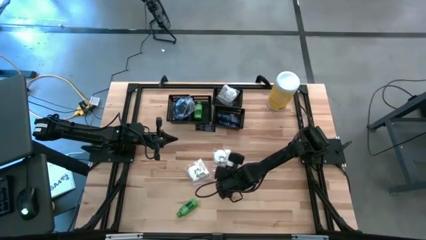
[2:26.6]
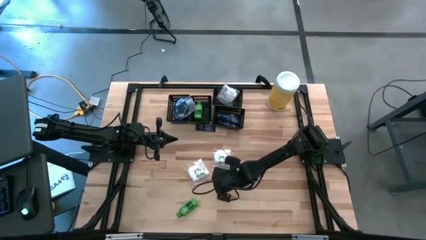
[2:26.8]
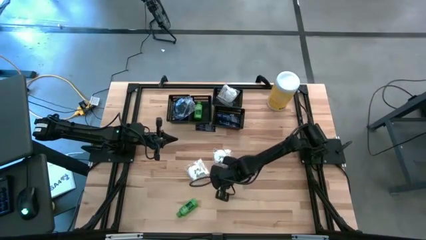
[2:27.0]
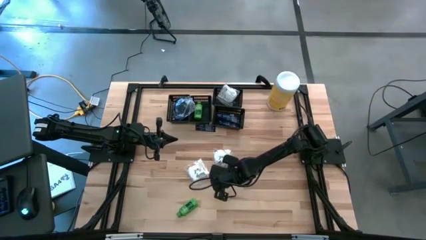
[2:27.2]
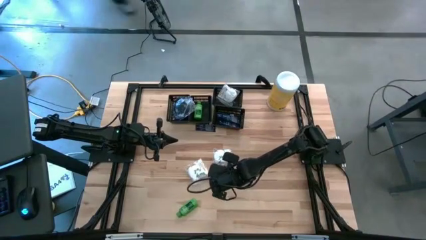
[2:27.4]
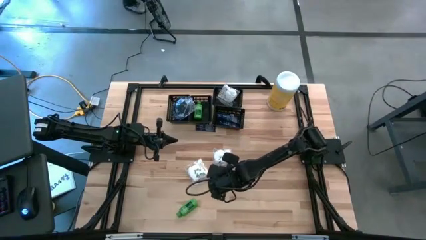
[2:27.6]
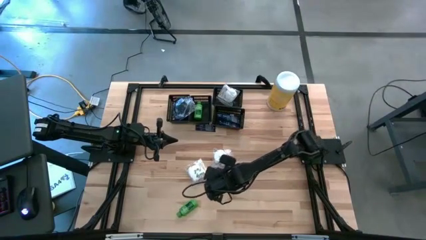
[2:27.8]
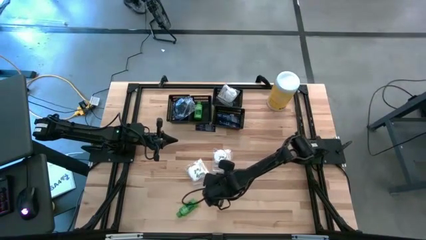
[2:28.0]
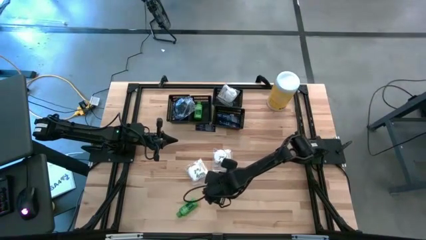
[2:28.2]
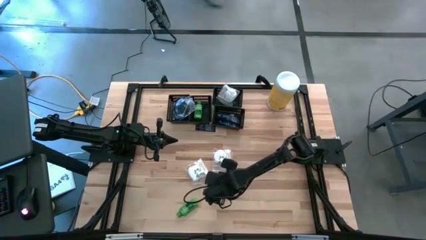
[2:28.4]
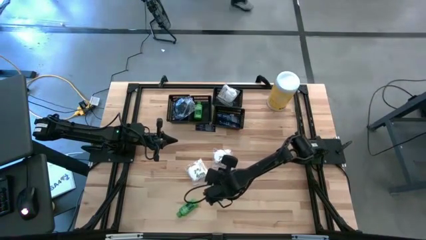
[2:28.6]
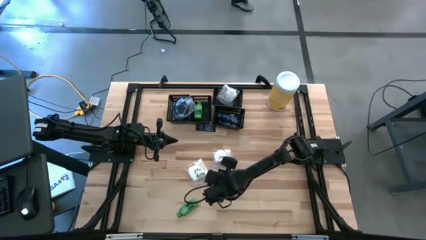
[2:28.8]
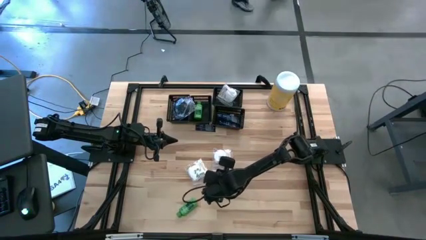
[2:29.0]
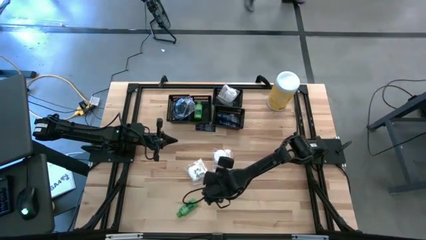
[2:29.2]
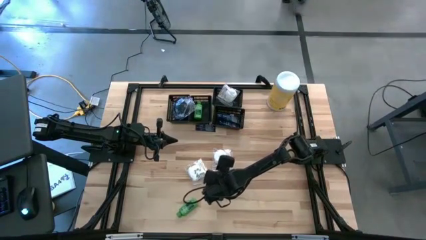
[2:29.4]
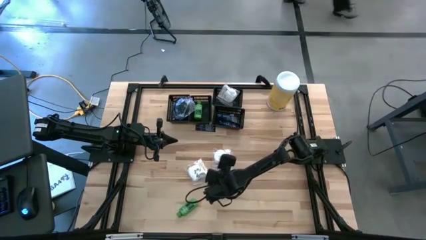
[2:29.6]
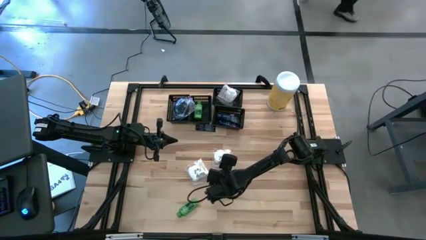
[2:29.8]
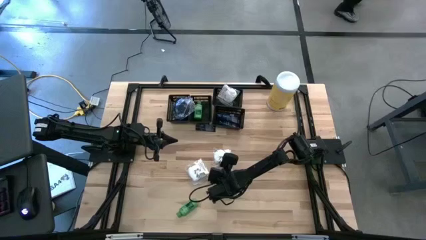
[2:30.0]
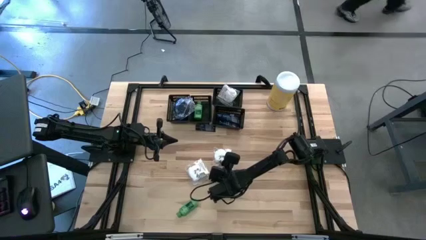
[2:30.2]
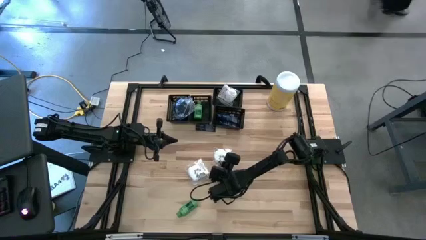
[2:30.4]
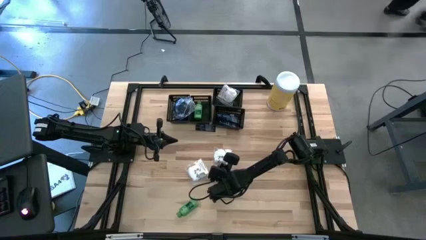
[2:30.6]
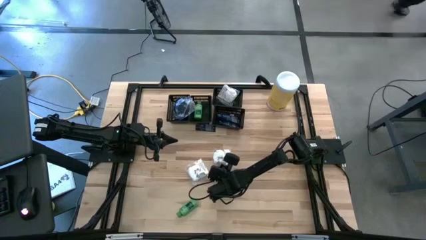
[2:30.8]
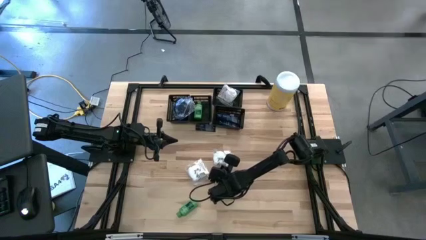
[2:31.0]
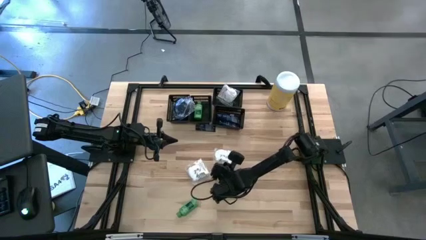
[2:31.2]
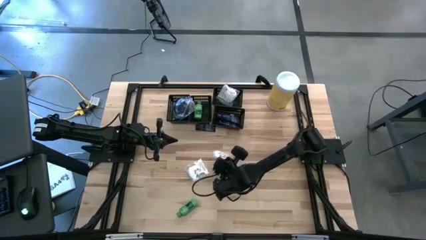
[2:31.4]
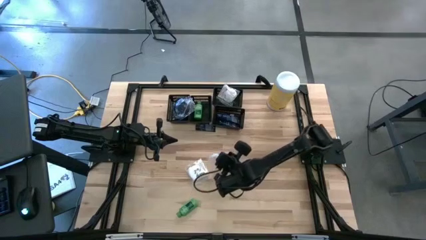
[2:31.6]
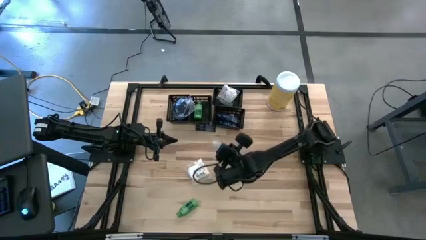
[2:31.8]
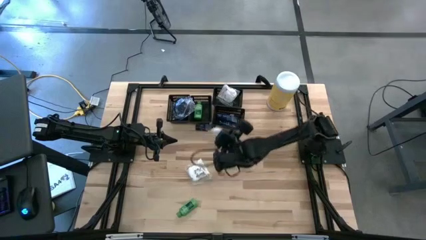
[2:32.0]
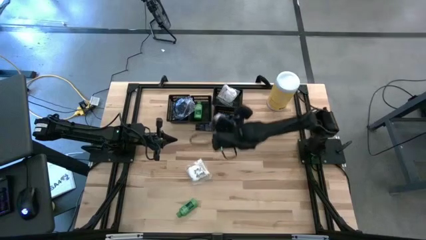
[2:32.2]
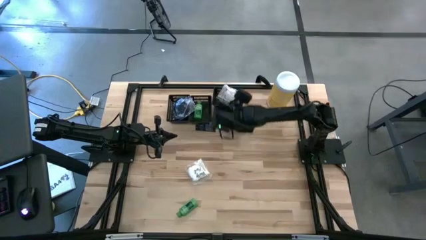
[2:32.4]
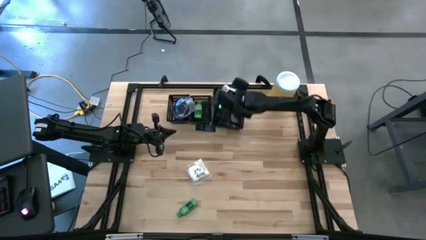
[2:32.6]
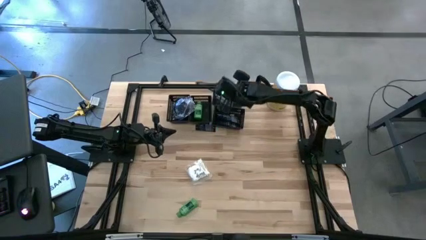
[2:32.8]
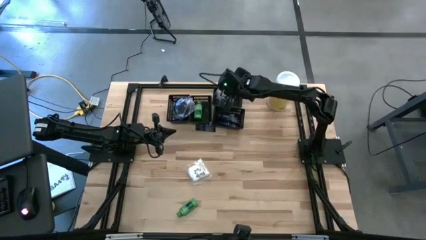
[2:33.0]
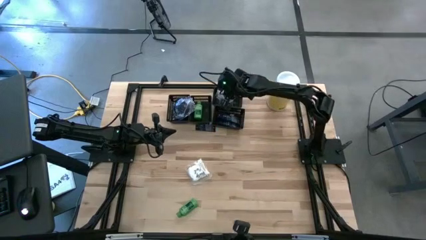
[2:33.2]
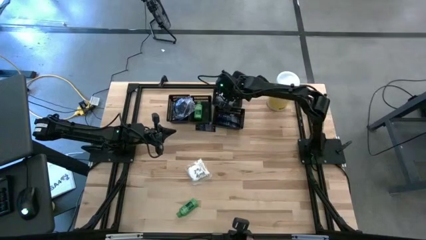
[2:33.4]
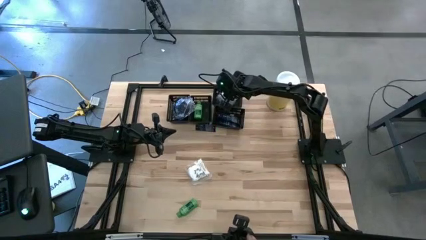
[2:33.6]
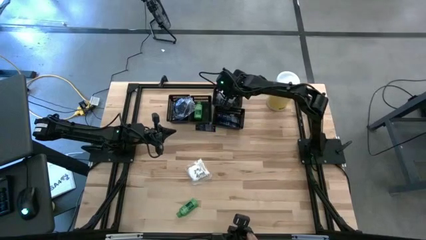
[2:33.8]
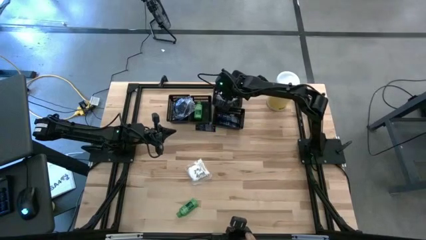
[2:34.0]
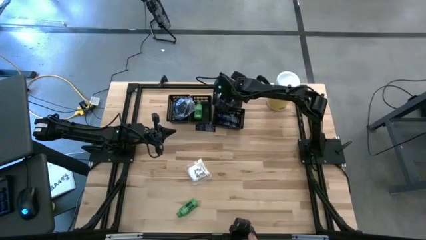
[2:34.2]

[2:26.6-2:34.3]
Task: Pick & Place Travel size toiletries
Put the white middle cotton buds into the top black bin

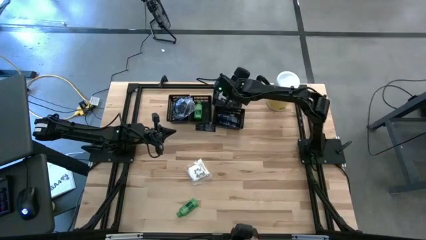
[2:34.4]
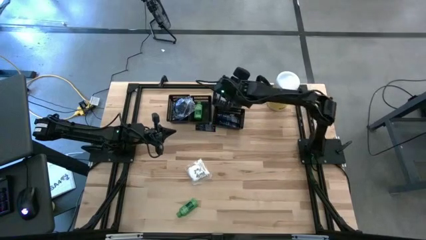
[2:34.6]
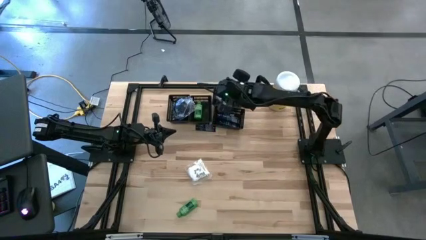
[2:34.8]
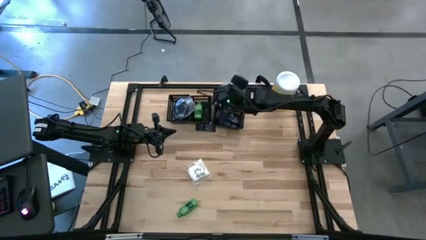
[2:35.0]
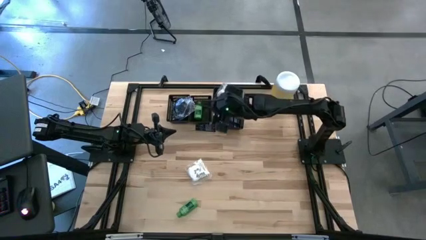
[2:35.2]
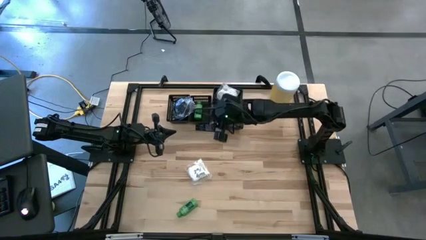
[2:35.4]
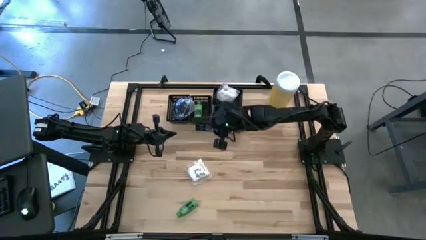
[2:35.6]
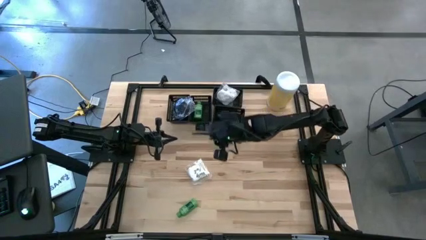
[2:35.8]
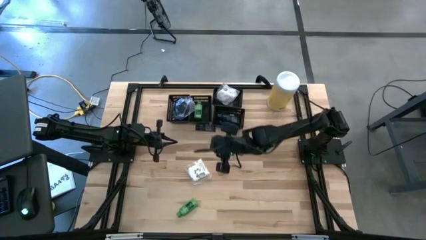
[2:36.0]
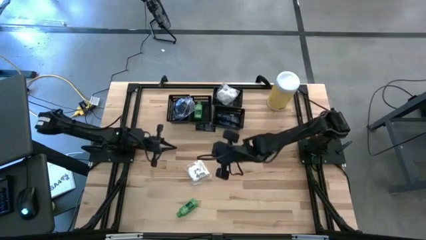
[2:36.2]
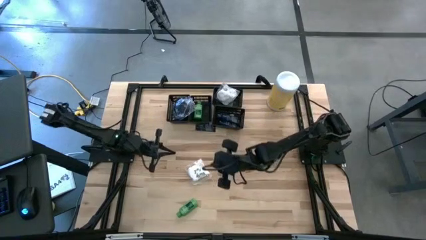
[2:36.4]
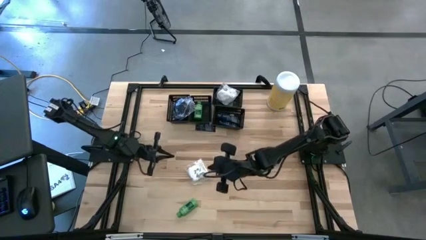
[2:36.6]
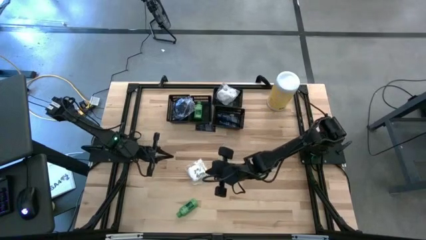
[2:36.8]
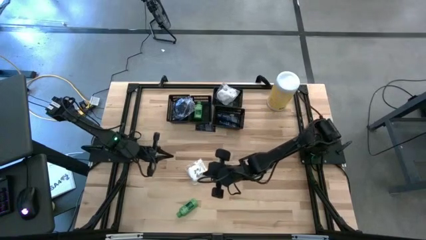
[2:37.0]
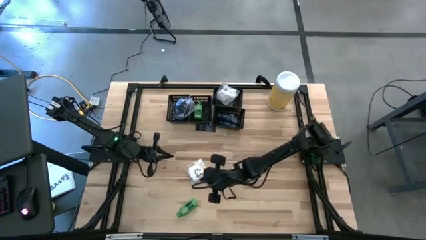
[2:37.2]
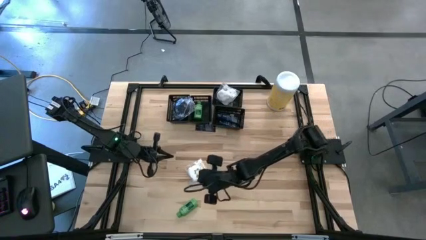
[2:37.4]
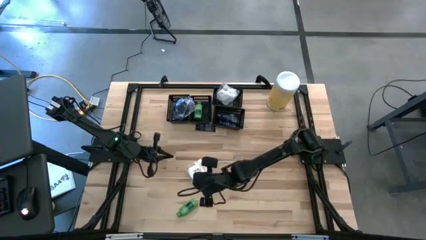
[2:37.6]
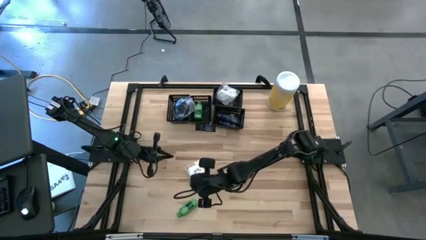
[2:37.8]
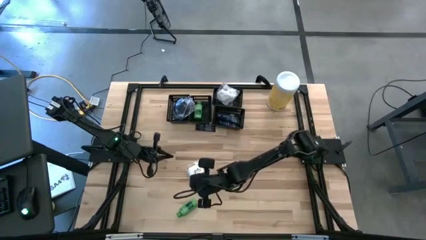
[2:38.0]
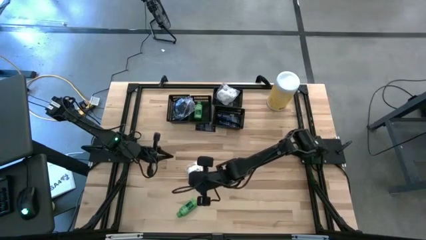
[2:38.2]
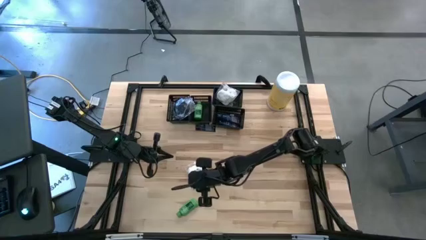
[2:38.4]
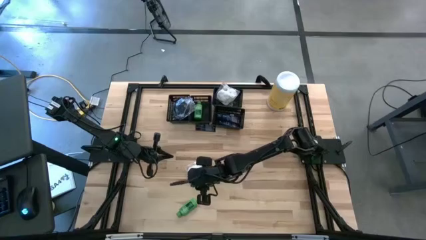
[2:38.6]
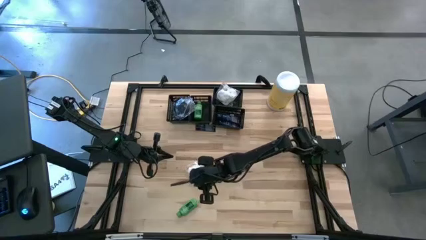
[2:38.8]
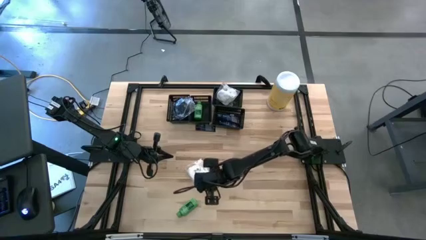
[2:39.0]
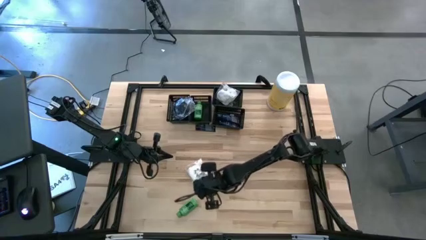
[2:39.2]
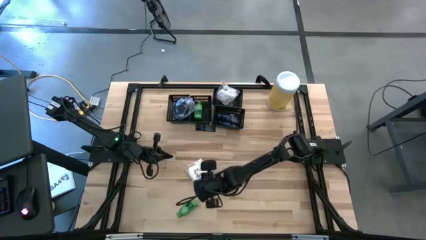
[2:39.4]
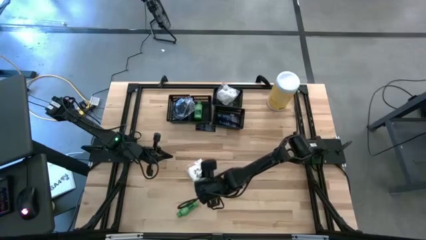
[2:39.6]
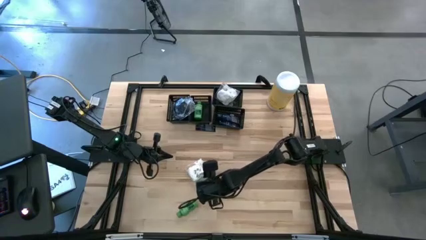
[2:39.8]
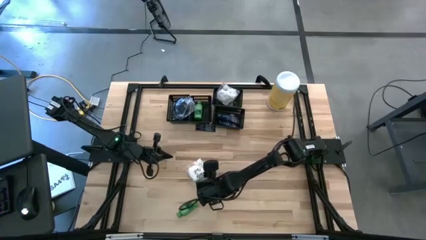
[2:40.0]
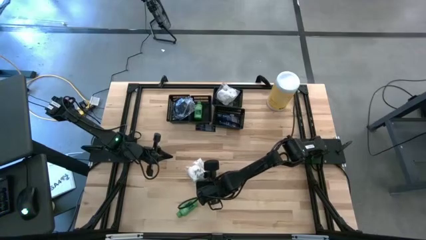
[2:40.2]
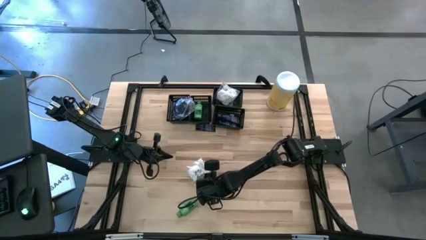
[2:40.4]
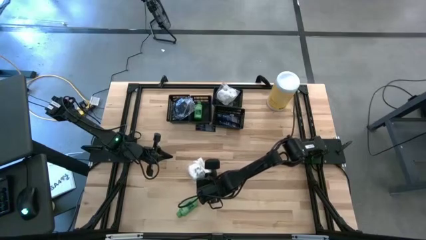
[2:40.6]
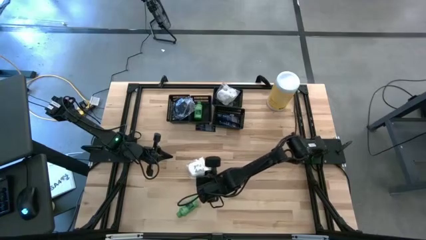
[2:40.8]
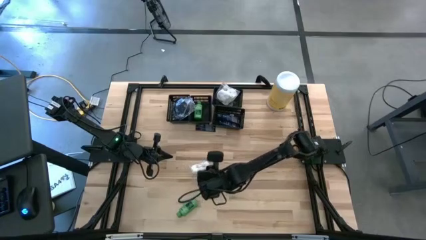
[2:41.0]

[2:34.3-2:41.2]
Put the white cotton buds into the top black bin
